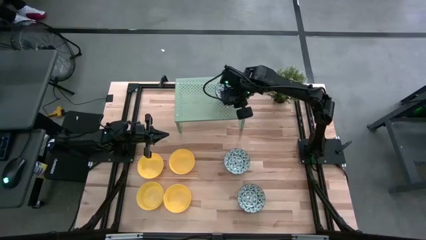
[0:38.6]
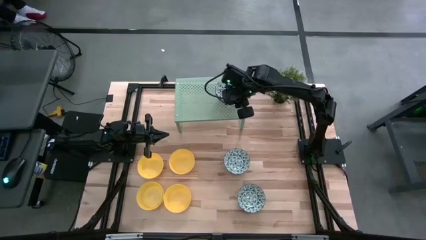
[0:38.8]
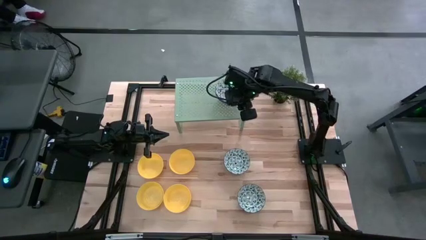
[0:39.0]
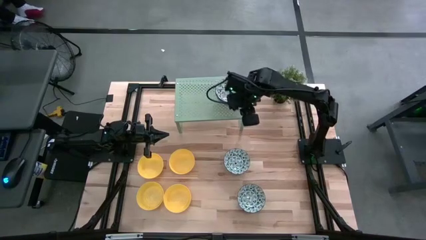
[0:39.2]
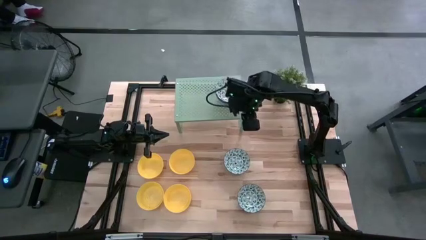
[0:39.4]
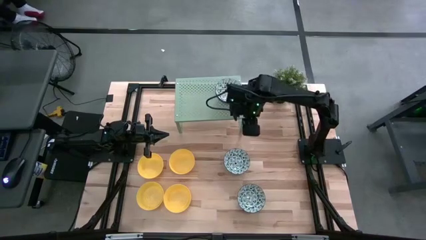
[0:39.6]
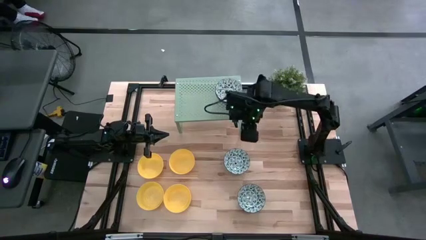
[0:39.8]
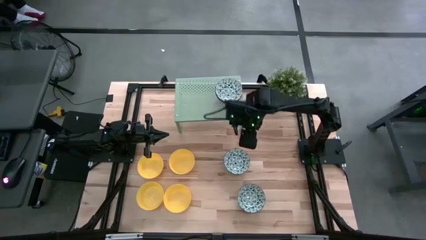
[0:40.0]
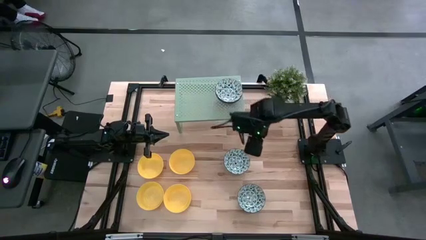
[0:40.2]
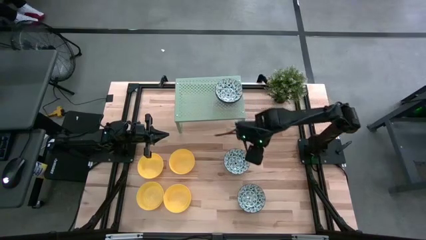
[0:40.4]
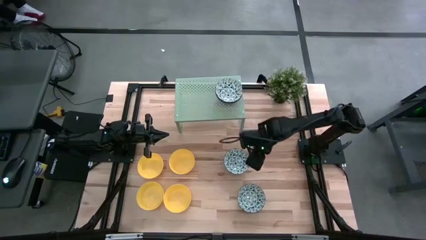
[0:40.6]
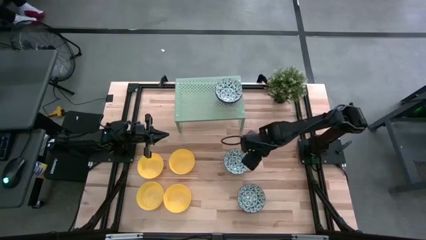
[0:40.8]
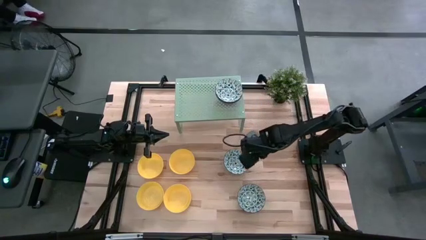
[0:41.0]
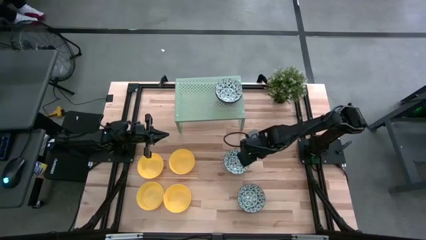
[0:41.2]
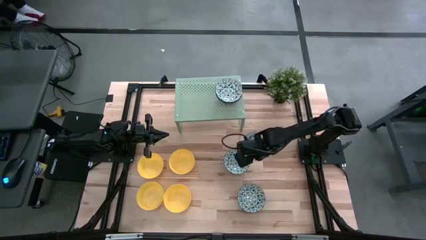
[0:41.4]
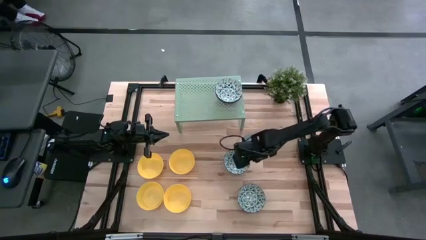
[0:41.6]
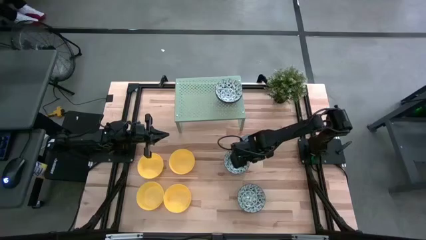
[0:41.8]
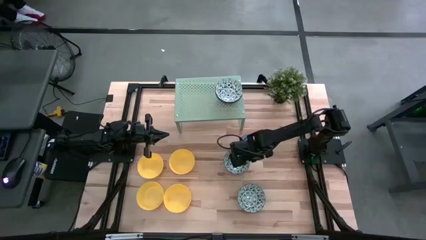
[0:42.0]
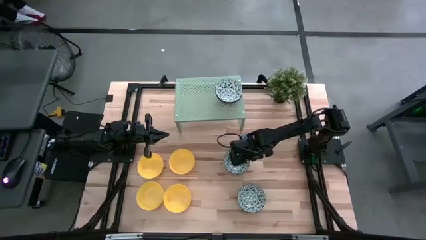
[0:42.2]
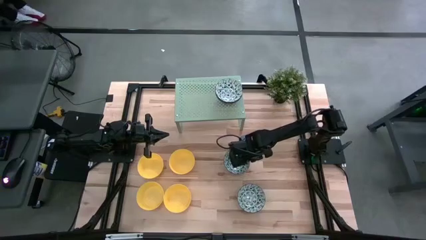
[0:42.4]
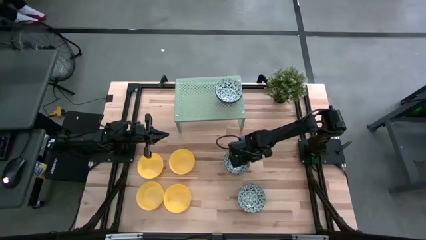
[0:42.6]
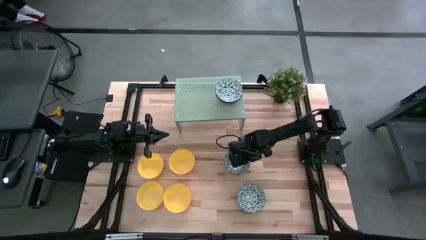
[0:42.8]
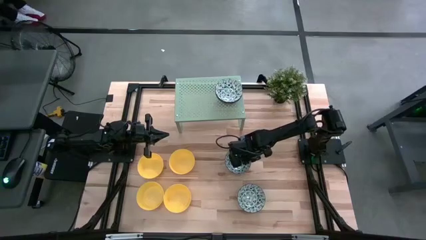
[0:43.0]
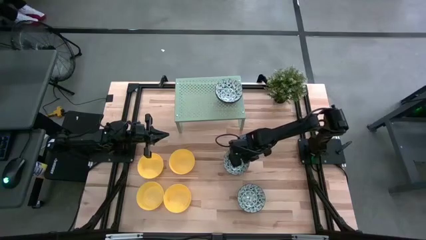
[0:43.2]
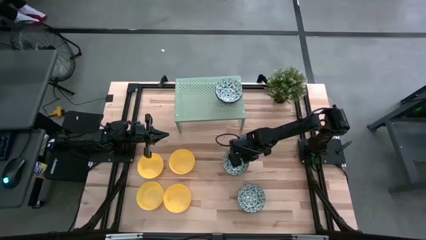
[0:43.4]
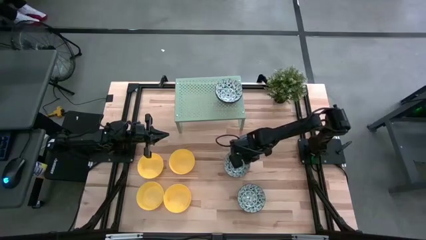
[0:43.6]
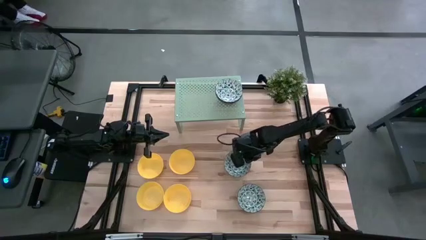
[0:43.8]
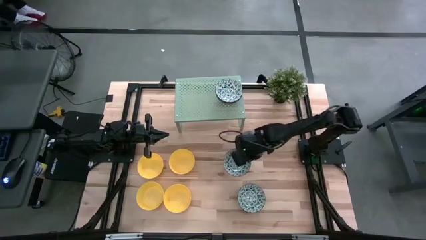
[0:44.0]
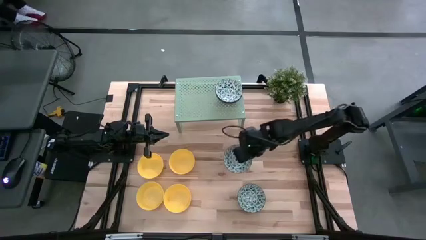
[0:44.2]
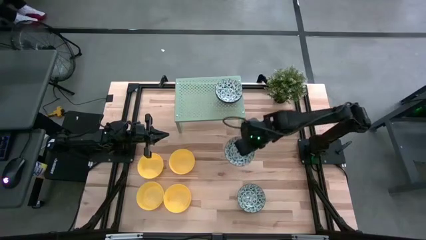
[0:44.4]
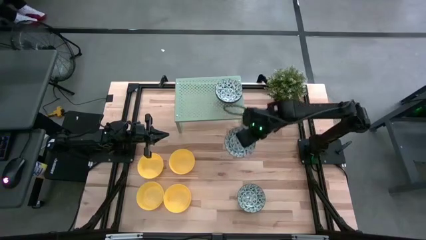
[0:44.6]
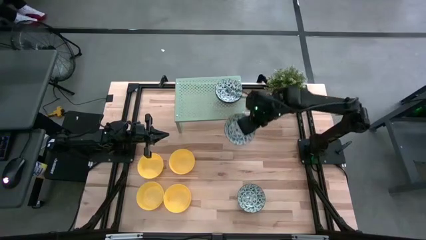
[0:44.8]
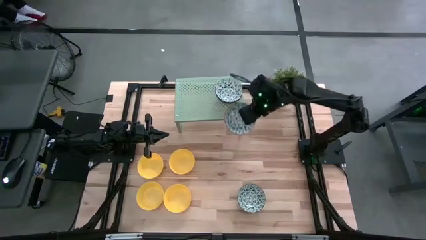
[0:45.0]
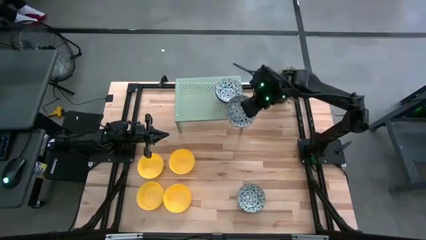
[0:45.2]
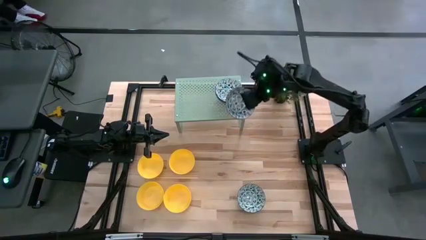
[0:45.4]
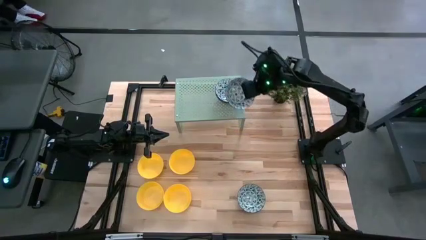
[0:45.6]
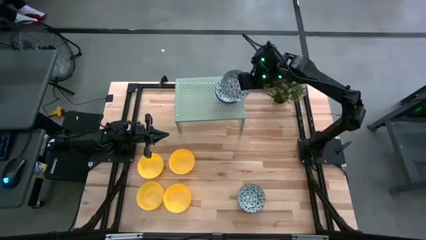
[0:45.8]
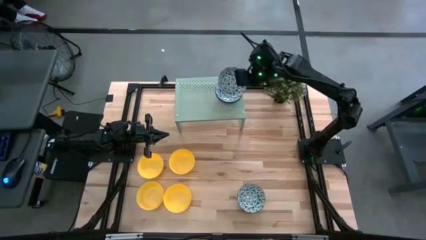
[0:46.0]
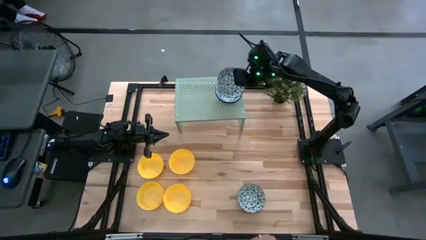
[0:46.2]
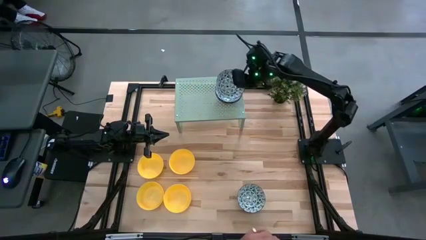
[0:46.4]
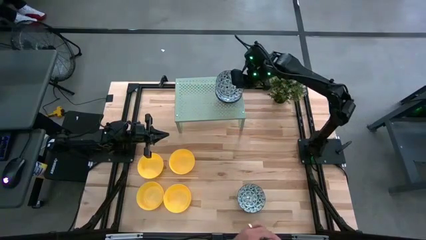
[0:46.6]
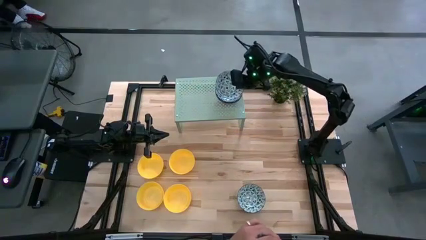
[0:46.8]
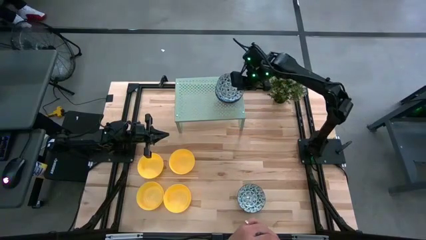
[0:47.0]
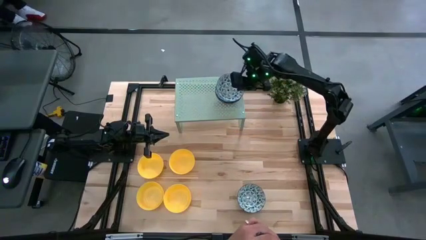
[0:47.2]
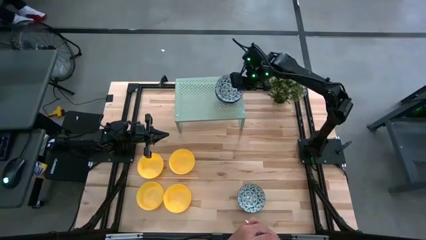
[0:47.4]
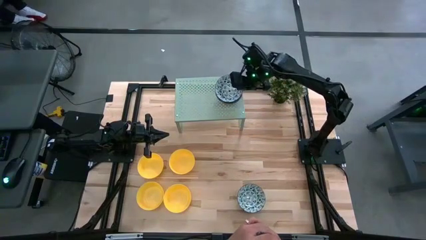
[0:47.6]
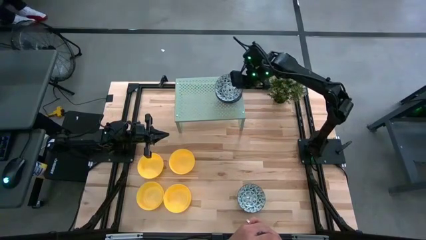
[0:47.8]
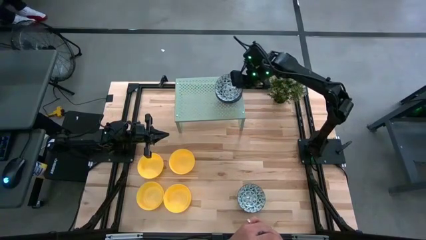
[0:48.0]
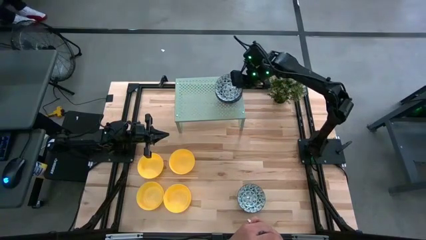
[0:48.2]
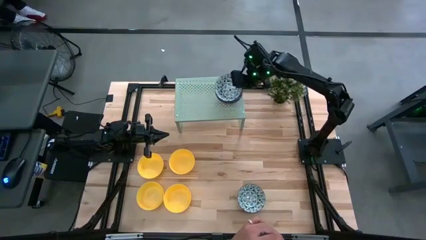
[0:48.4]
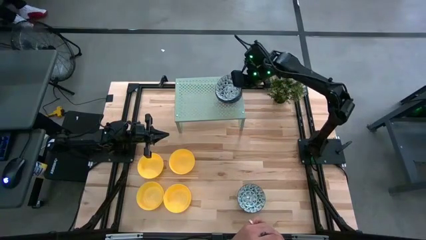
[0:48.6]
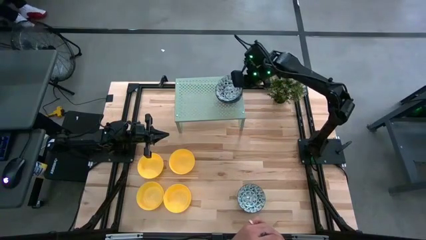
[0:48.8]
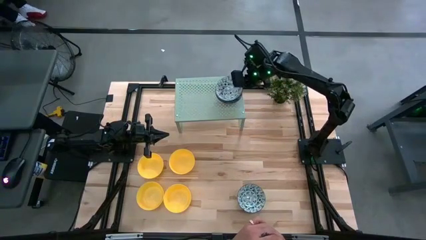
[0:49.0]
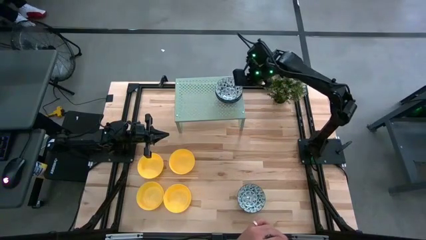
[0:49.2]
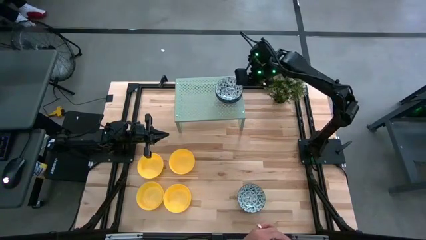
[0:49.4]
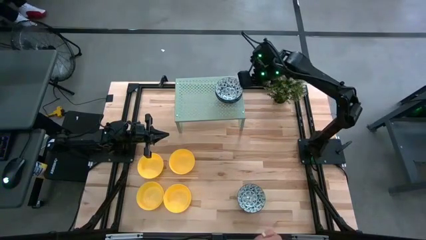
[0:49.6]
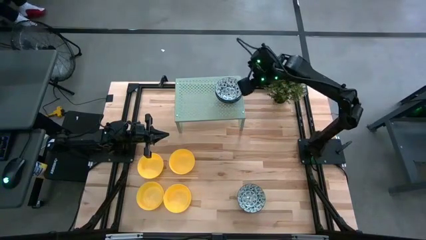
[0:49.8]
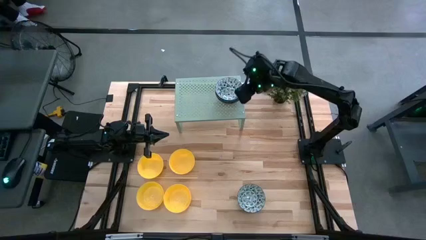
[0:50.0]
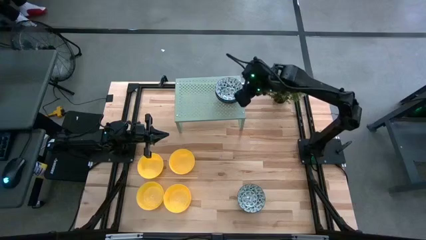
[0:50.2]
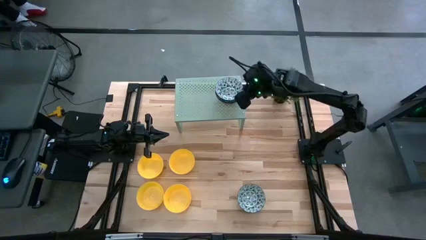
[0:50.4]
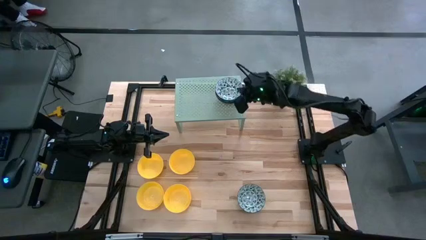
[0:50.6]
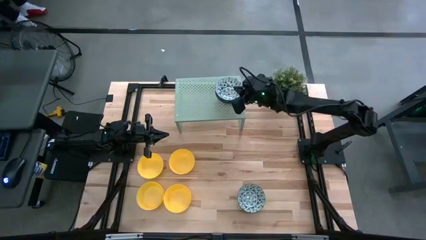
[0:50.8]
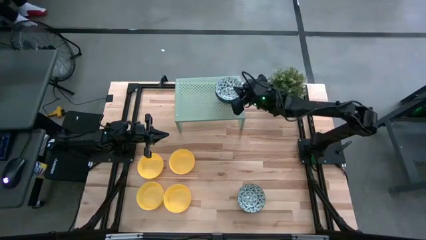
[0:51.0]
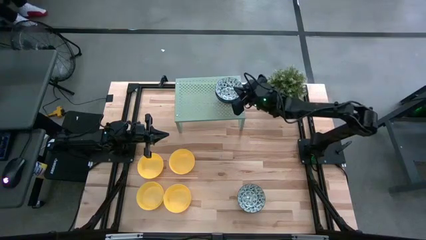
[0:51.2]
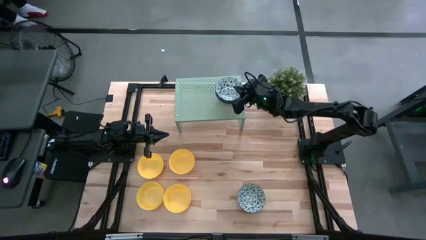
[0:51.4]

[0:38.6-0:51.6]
Task: Pick & Place Mini bowls
Stack the blue patterned bowl on top of the other blue patterned bowl on the shelf
